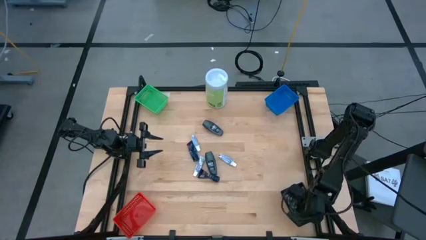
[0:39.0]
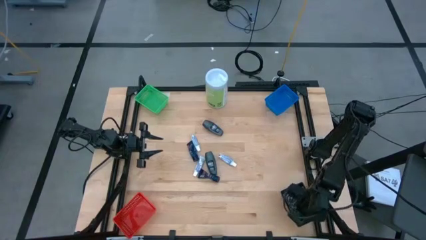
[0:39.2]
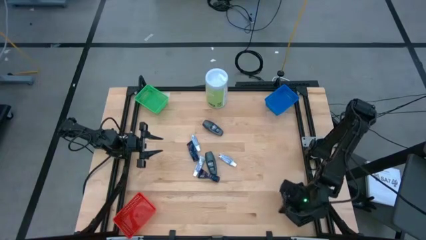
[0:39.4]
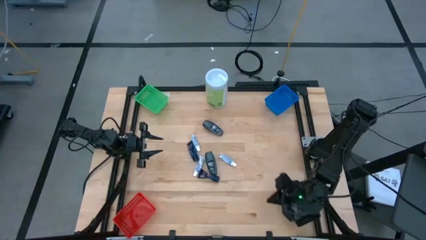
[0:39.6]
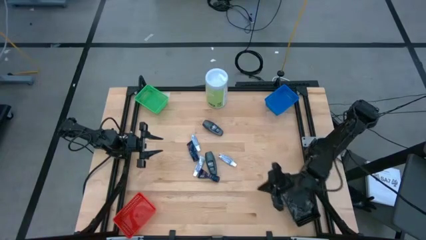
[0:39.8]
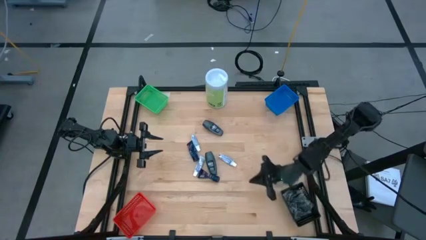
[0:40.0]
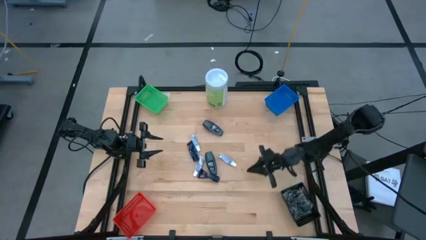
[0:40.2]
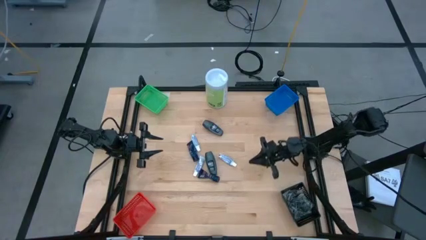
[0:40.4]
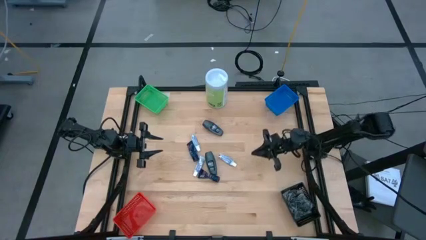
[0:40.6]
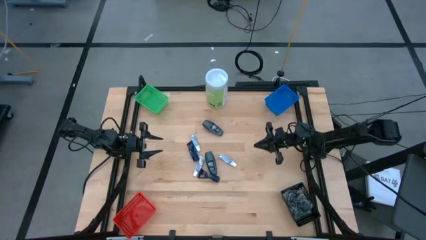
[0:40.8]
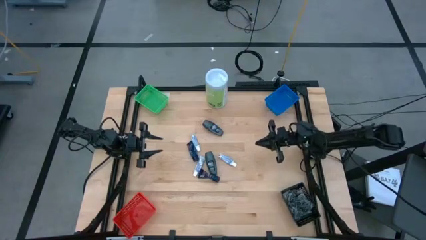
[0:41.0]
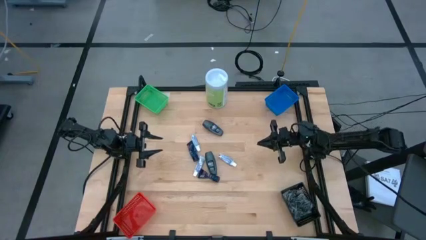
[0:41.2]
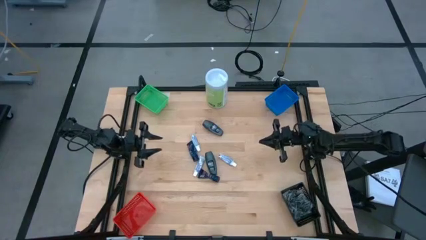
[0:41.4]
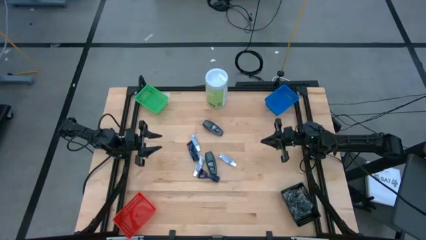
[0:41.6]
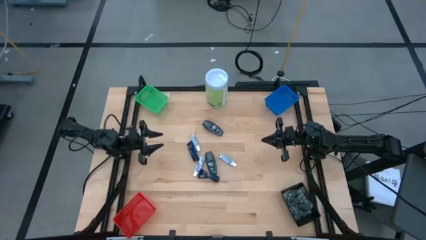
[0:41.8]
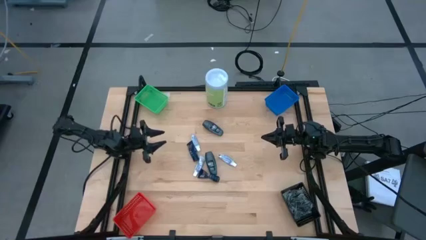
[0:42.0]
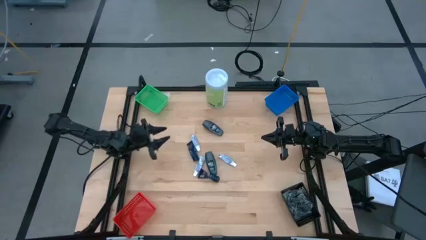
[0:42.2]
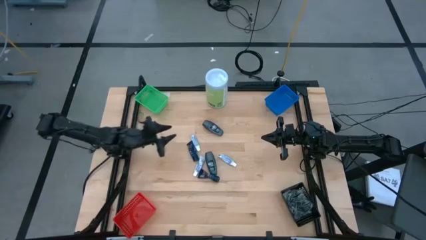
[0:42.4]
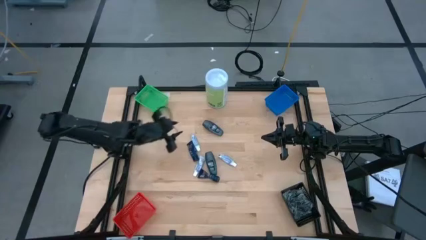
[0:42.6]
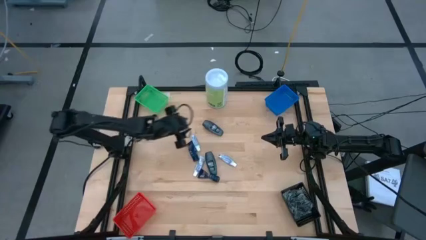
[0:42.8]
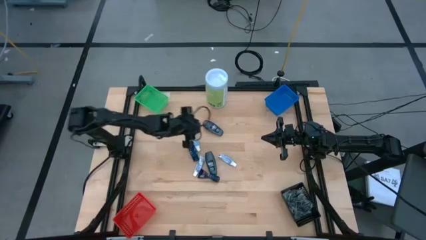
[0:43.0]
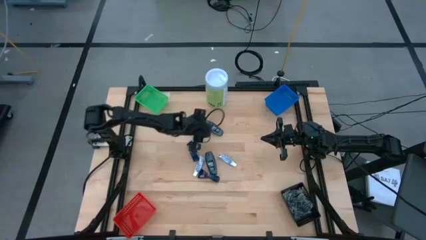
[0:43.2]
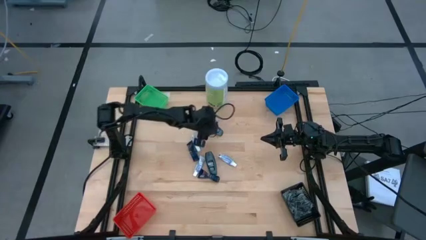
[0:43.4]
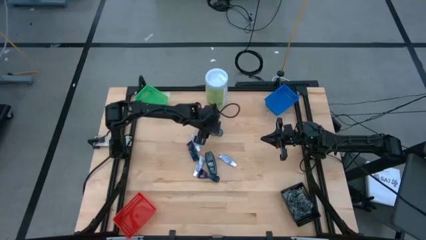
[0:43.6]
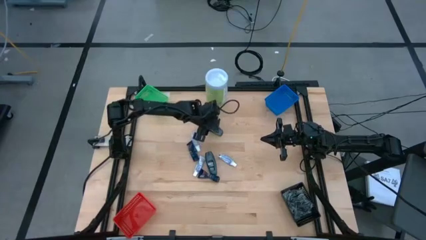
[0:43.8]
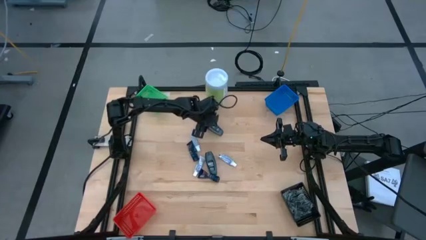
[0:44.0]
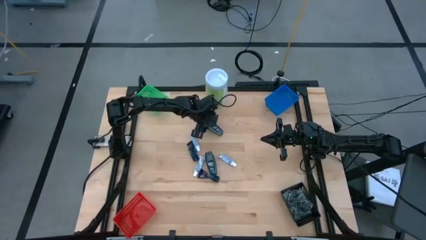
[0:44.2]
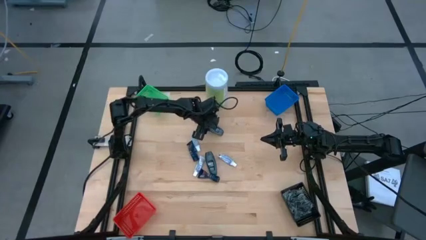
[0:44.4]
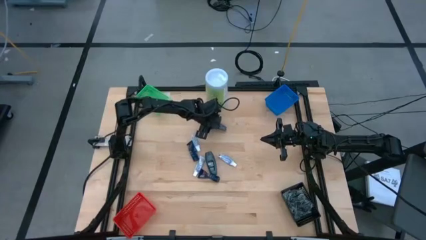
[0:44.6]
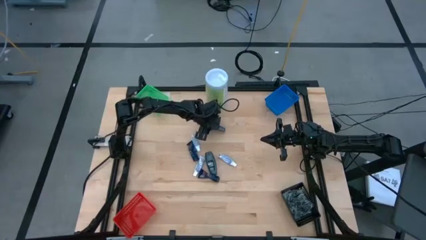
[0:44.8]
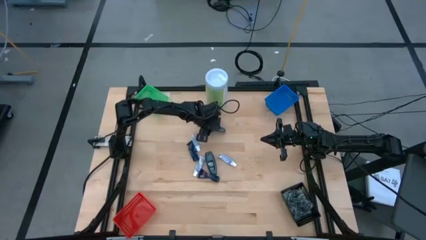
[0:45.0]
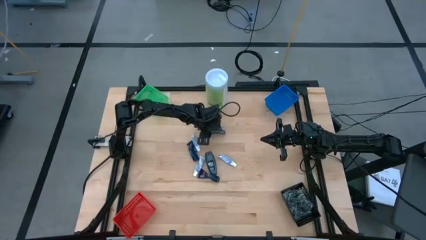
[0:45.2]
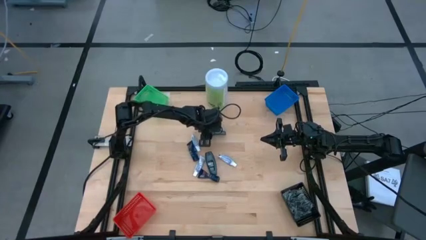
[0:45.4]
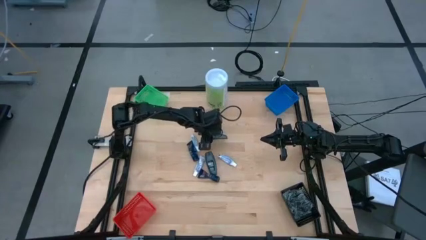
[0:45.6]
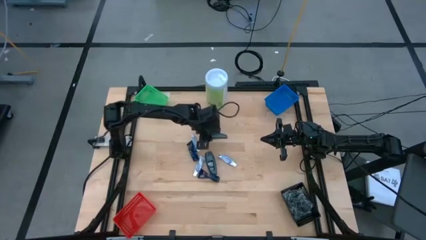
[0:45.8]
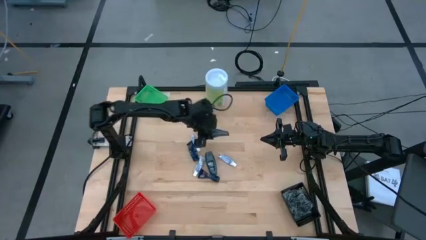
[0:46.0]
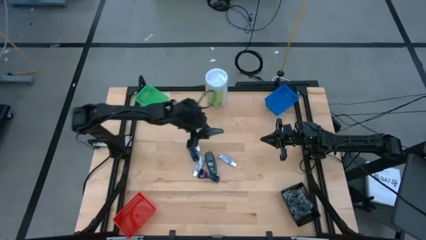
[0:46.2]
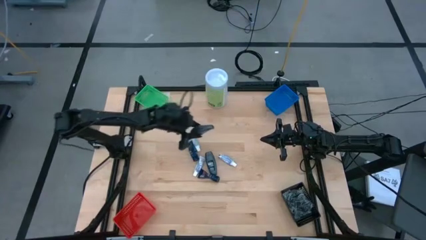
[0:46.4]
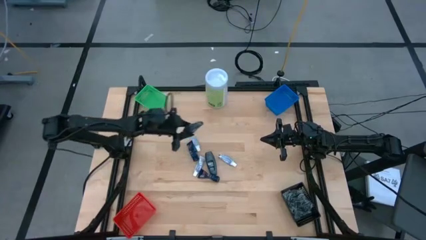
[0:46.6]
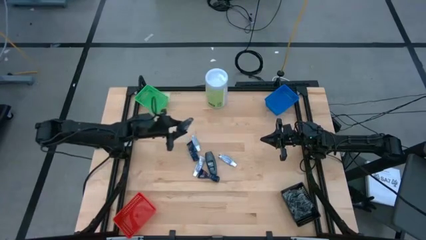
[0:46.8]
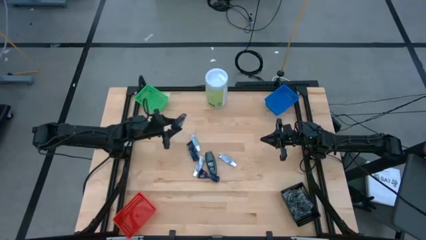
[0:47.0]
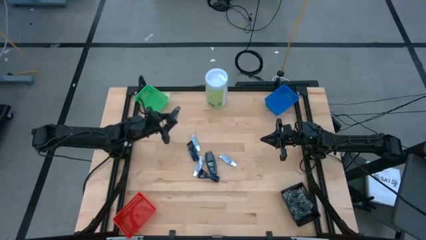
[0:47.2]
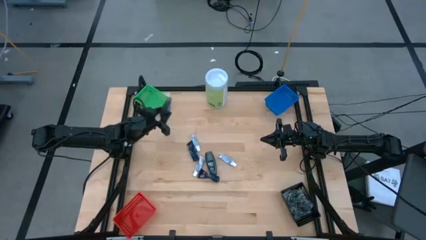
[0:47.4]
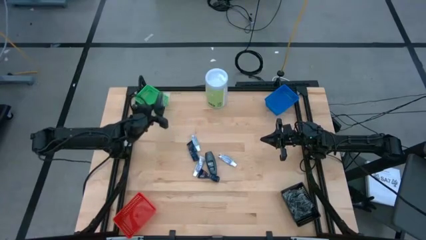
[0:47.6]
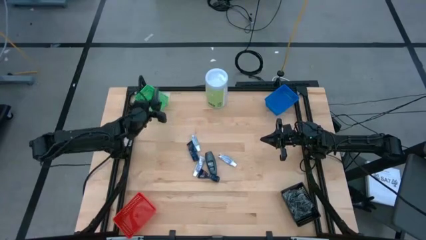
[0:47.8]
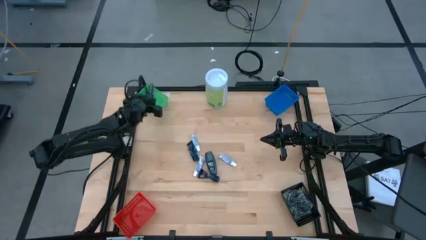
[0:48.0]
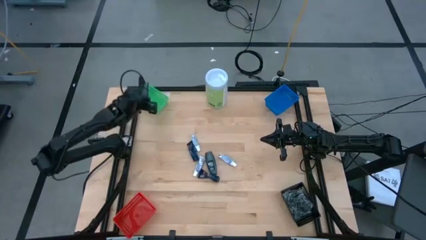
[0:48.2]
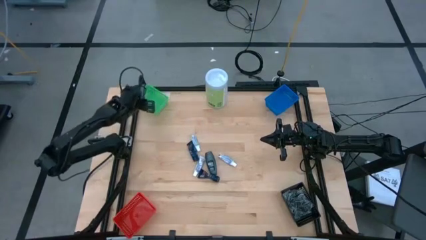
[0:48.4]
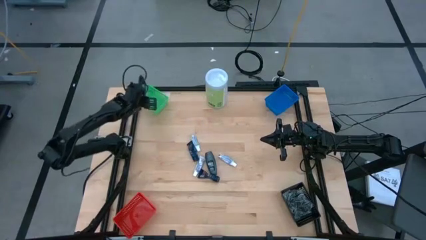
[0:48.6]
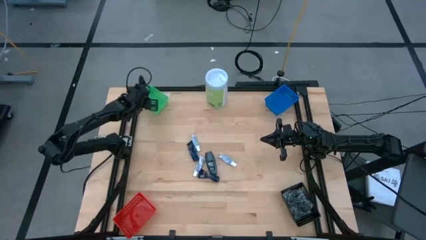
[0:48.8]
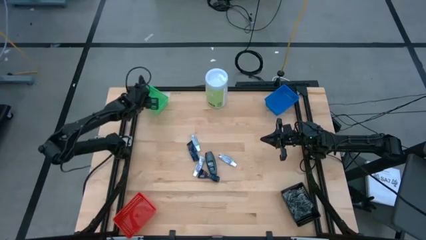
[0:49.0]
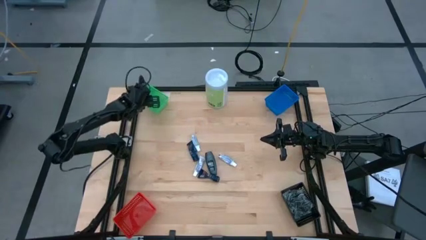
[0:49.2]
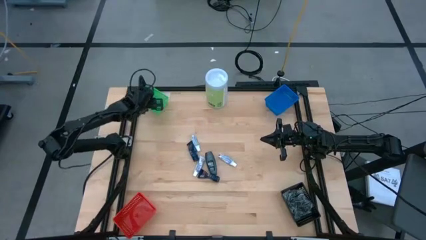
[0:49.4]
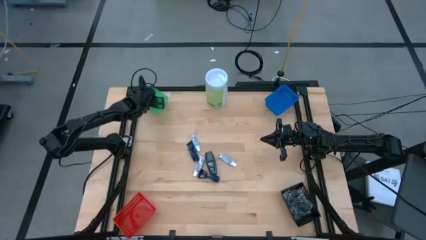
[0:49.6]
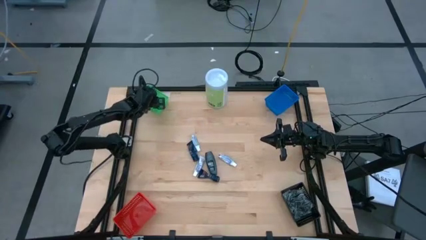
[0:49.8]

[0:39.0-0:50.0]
Task: Pick & Place Travel size toiletries
Put the top black deodorant into the green bin
